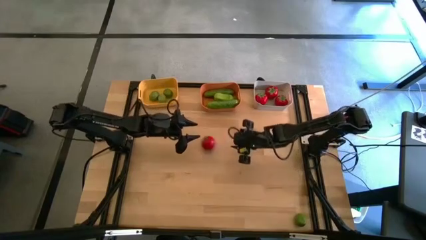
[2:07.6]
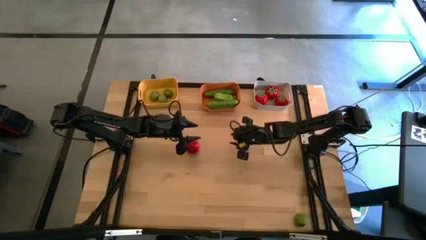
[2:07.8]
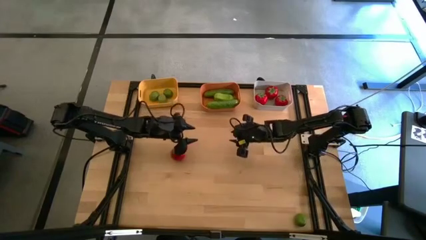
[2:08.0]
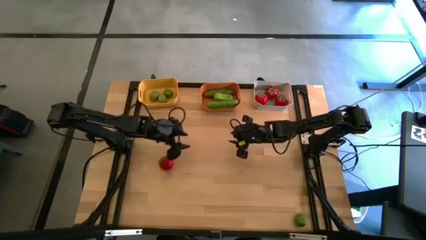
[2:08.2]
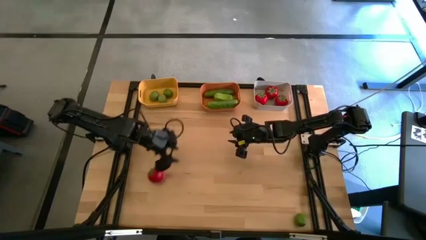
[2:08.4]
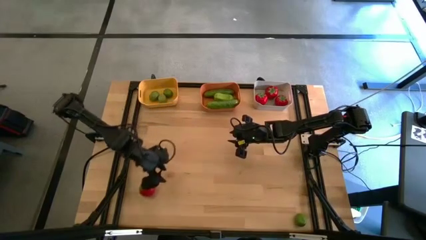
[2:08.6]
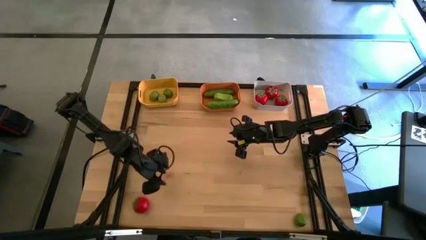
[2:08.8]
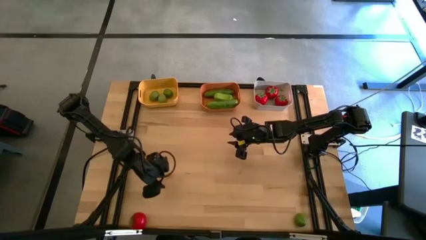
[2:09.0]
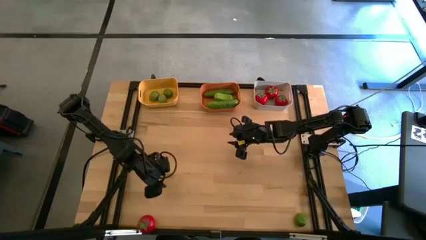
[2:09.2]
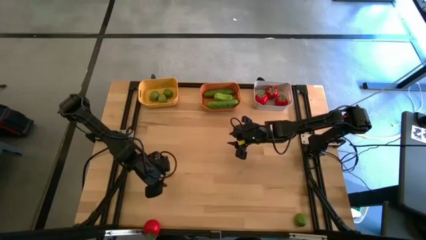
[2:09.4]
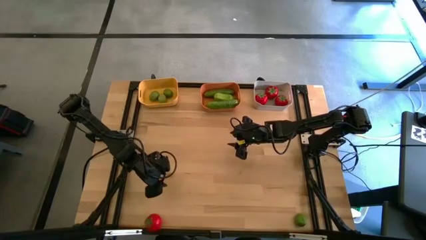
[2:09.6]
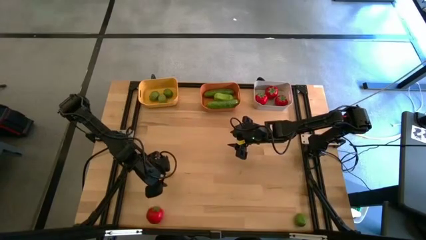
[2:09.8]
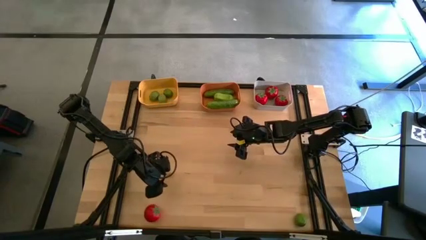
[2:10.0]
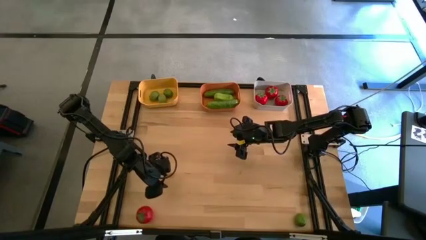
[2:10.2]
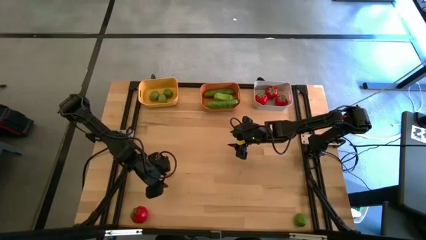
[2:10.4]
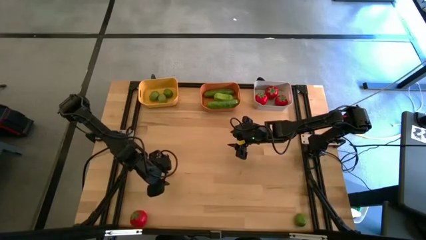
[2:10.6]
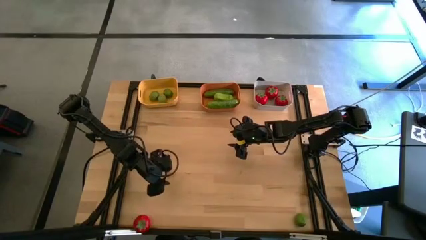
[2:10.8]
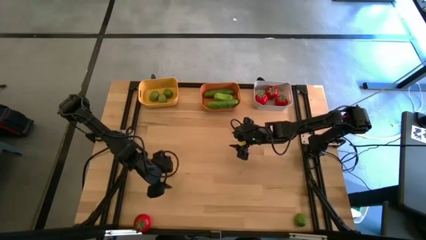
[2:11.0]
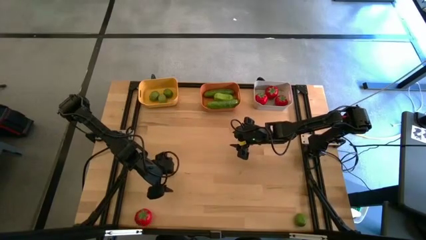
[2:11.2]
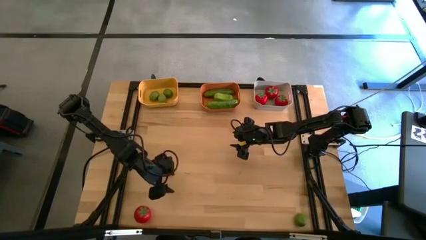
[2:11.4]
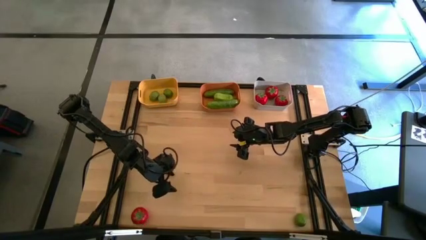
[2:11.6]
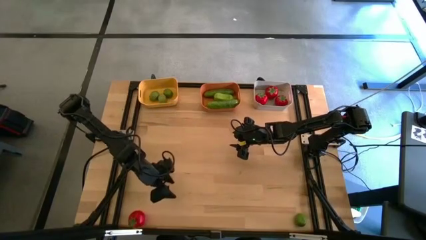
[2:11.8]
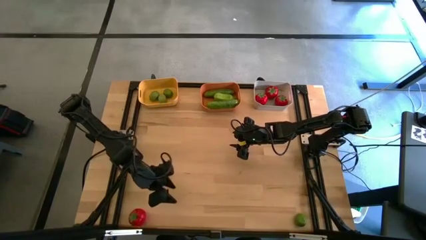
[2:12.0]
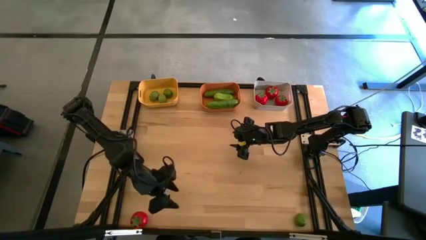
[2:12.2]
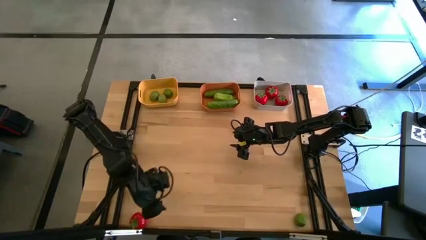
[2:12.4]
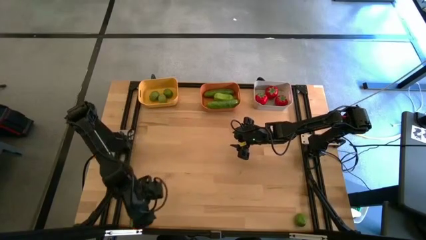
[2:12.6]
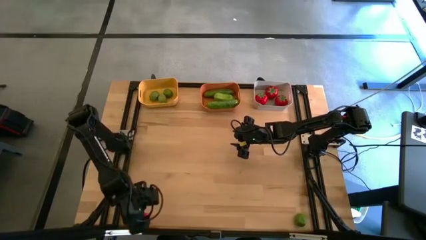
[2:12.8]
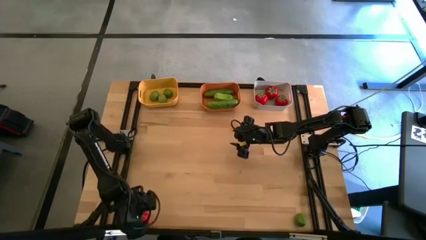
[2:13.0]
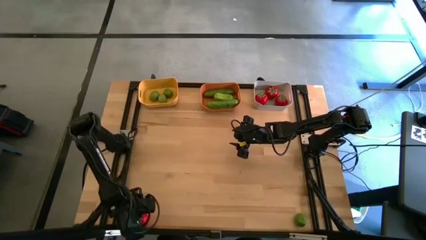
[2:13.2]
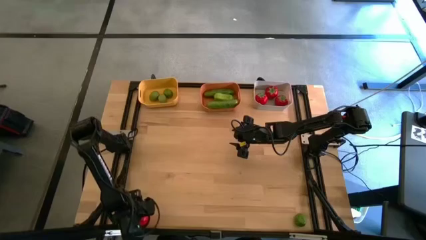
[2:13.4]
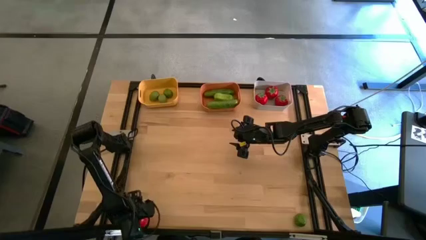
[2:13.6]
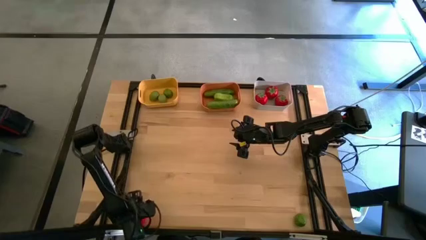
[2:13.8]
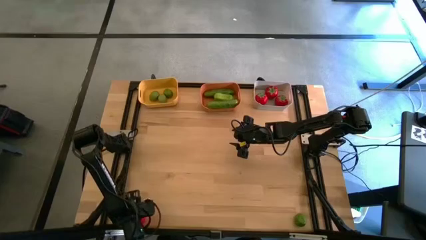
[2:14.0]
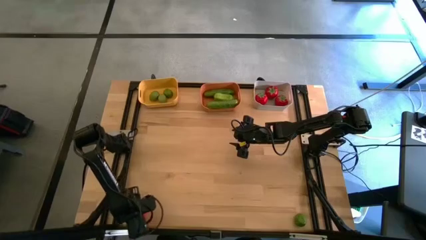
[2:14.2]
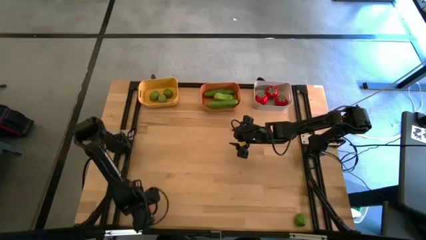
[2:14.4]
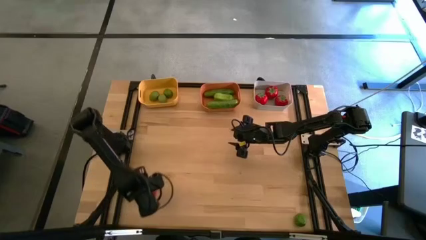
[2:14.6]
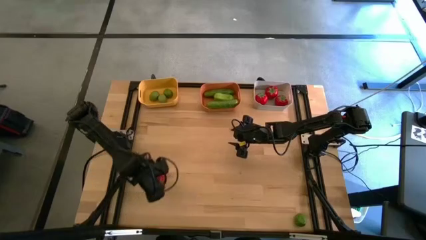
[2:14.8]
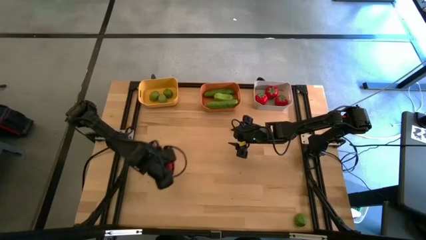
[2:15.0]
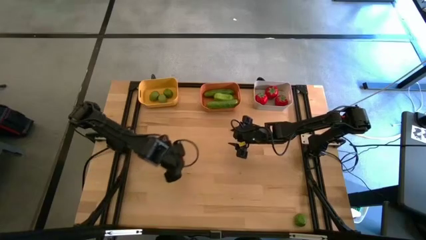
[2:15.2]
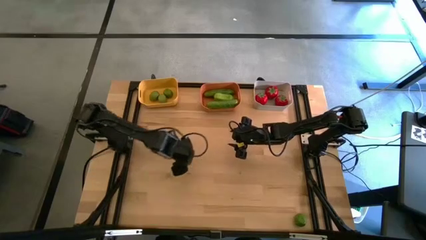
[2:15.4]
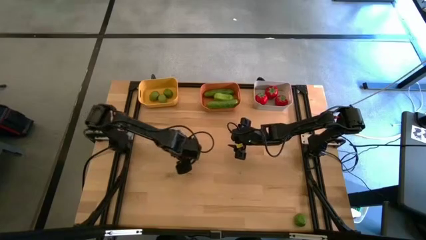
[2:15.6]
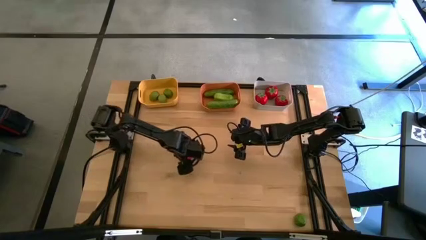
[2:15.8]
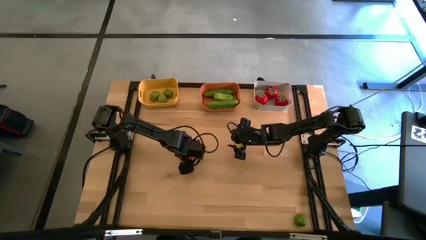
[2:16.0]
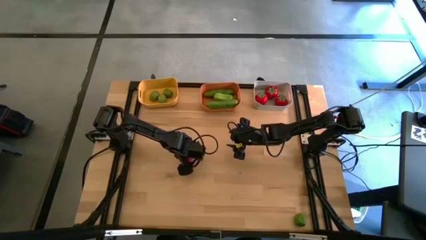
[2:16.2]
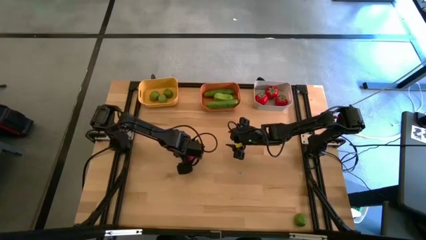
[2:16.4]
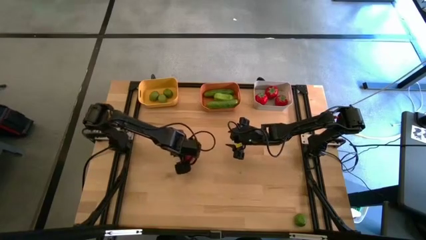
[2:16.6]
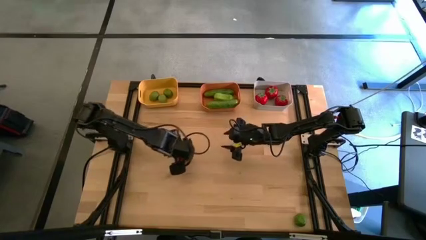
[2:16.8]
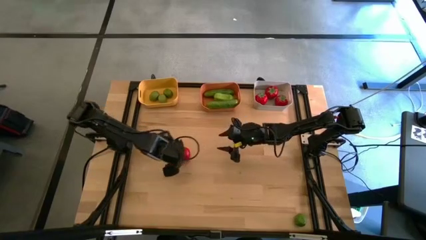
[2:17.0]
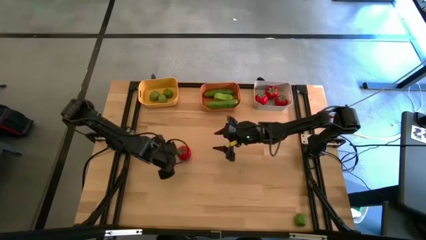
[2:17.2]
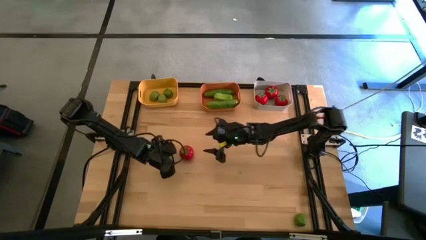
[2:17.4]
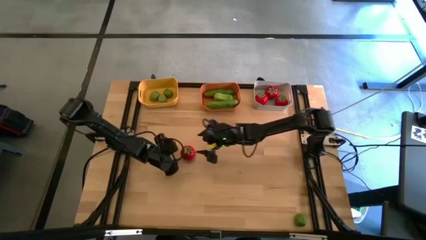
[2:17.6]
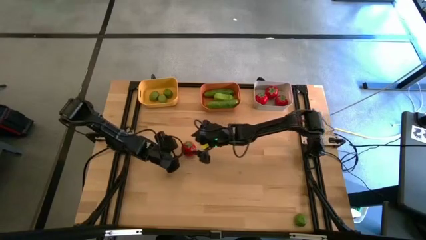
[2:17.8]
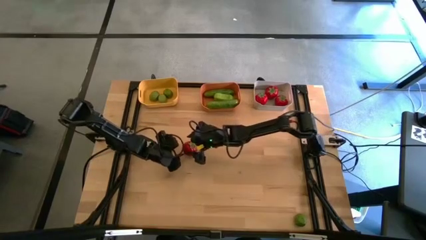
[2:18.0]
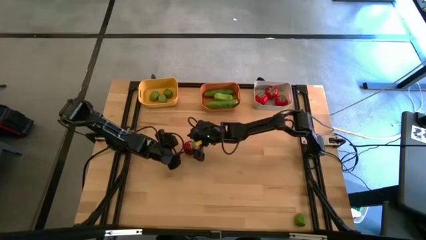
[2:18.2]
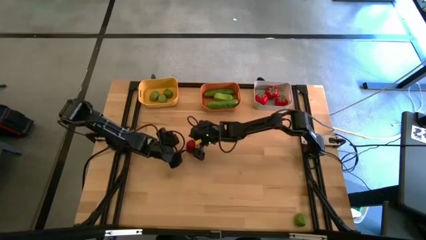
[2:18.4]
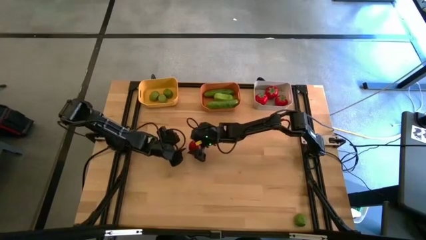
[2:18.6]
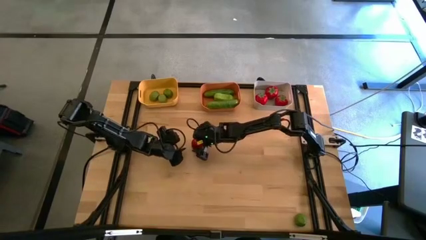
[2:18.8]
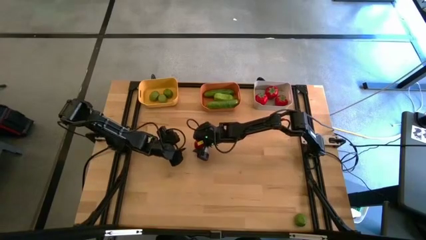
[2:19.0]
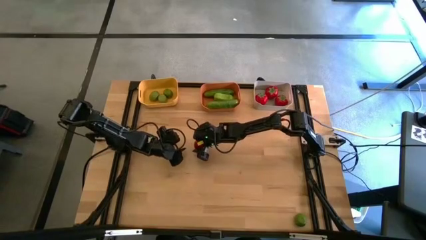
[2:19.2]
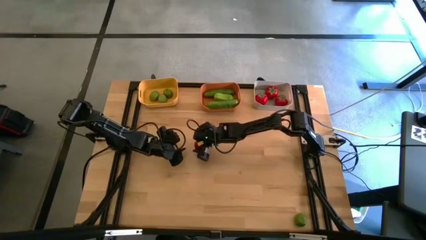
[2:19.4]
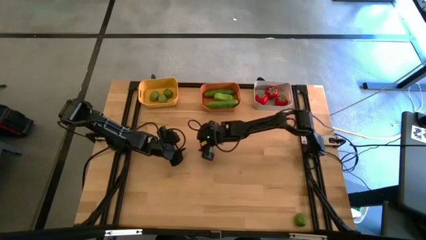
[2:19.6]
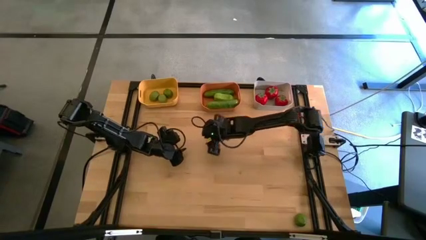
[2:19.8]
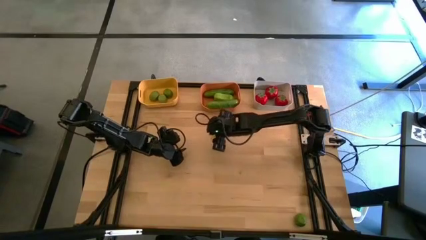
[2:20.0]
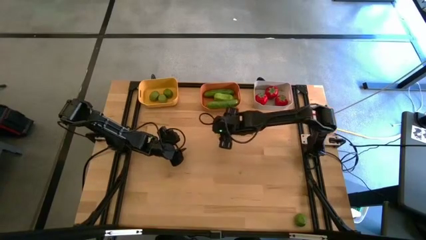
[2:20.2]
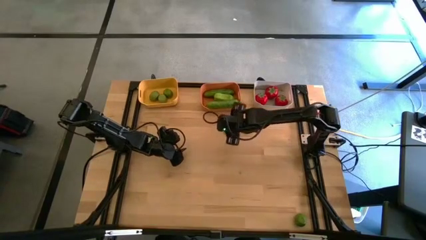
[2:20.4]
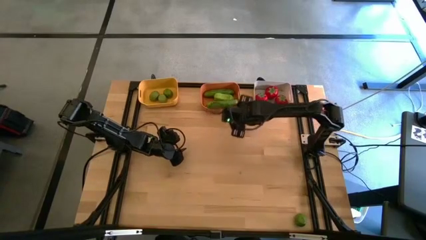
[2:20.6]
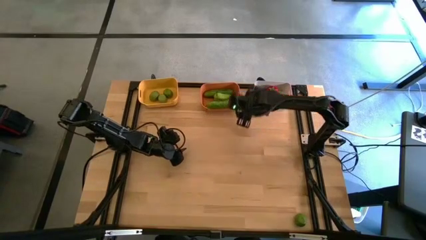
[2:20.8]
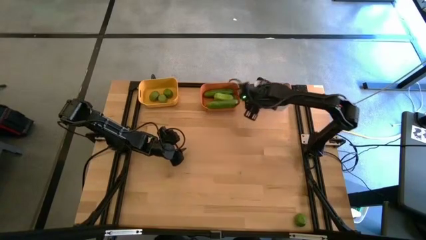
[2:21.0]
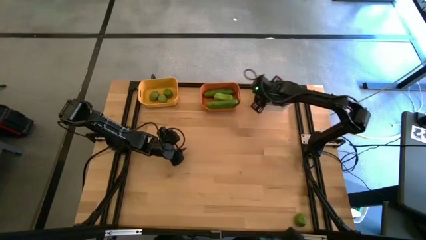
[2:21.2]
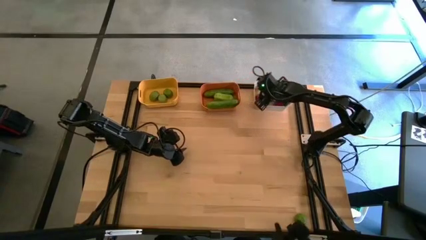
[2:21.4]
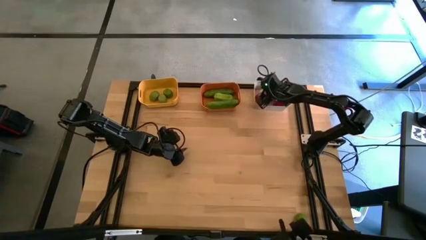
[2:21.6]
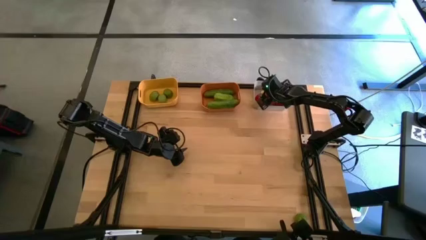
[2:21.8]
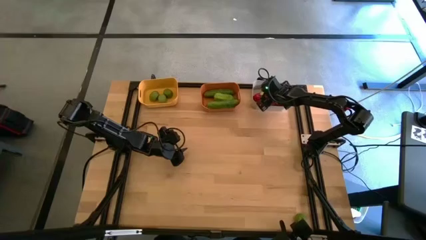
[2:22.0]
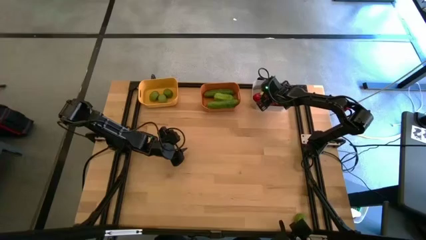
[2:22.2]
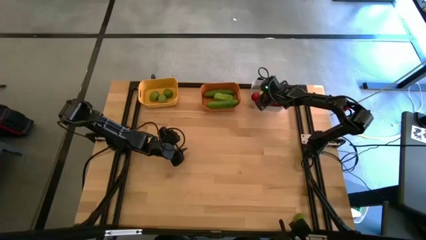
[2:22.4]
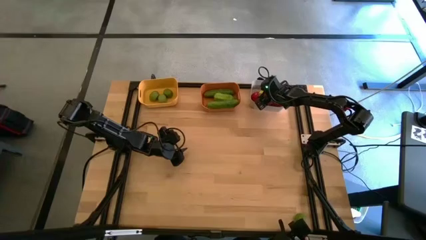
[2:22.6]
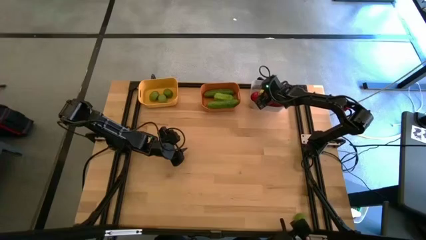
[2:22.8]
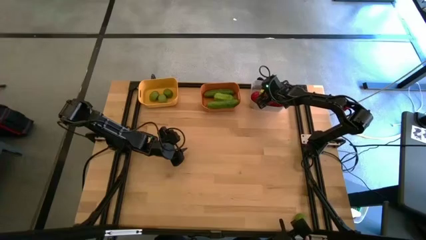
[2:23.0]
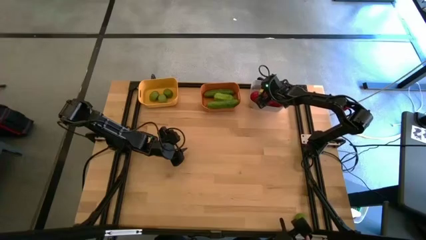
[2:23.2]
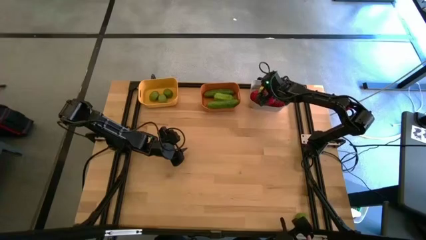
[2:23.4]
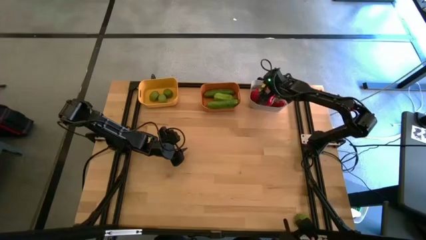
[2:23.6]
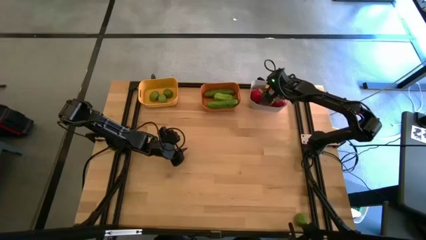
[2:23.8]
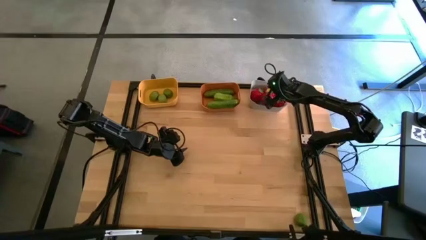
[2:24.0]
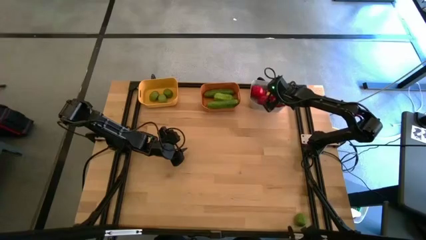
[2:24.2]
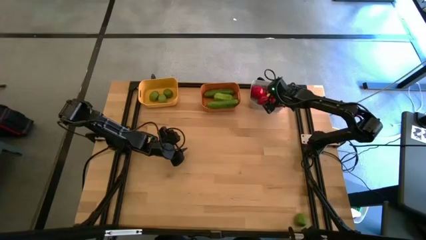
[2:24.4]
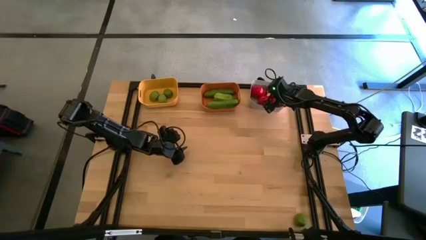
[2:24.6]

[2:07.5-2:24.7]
Task: Sort produce into baskets
Put the tomato into the white bin
